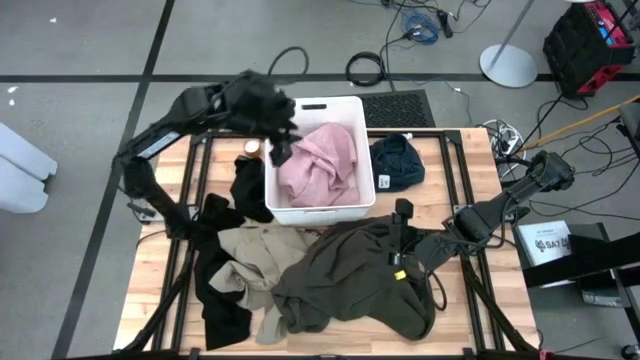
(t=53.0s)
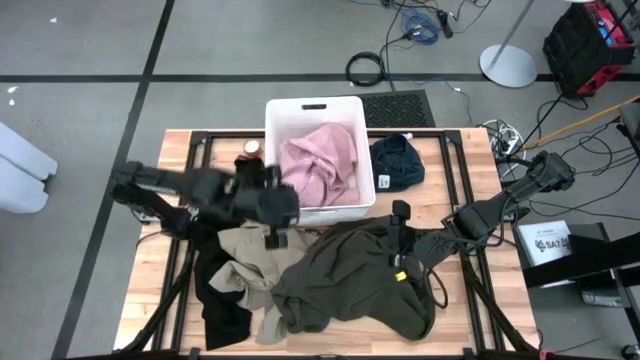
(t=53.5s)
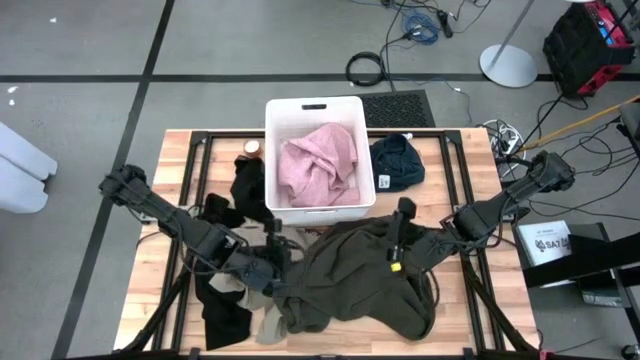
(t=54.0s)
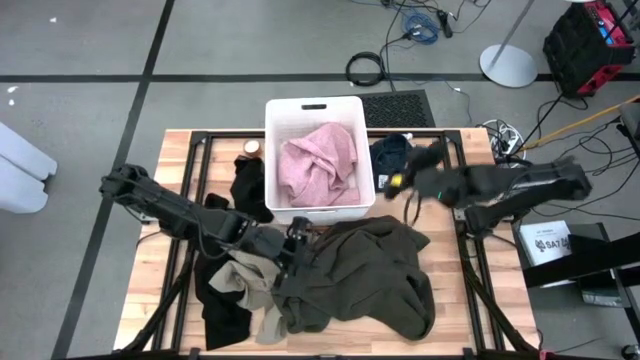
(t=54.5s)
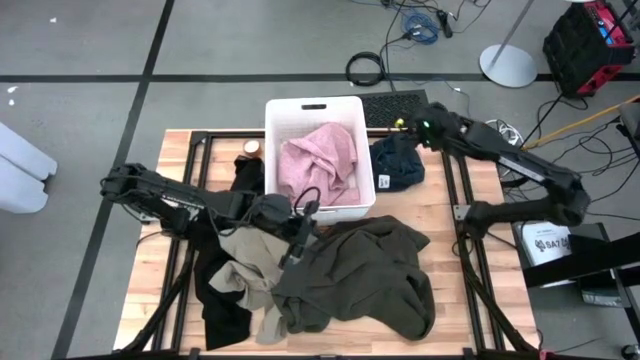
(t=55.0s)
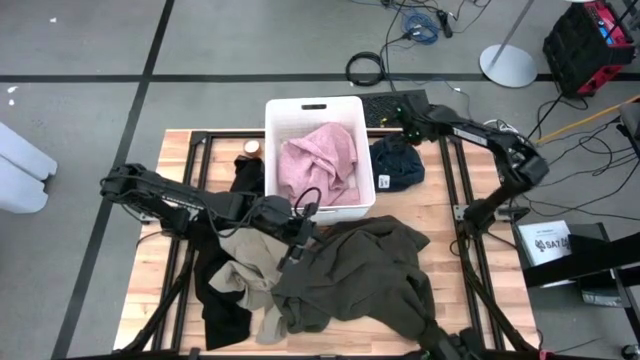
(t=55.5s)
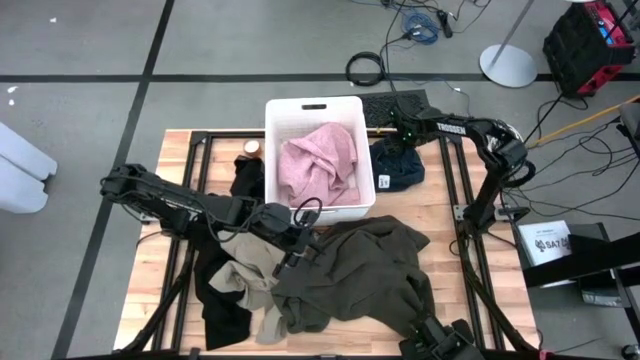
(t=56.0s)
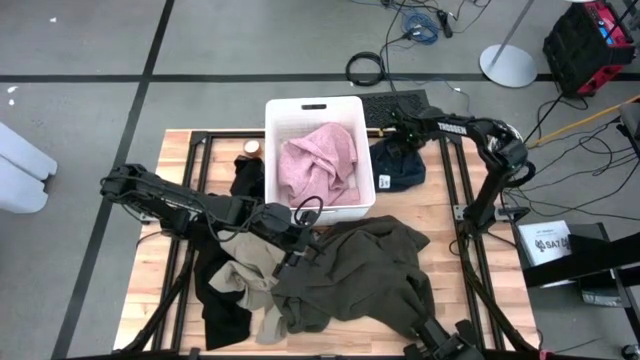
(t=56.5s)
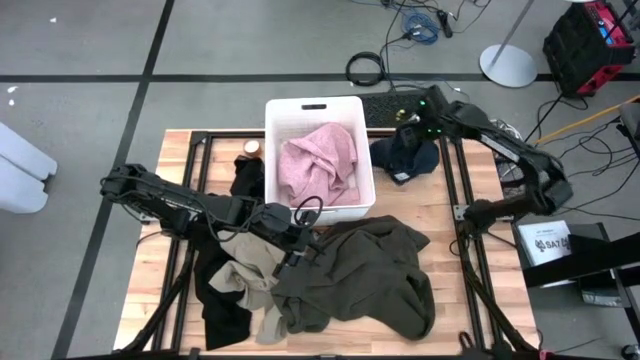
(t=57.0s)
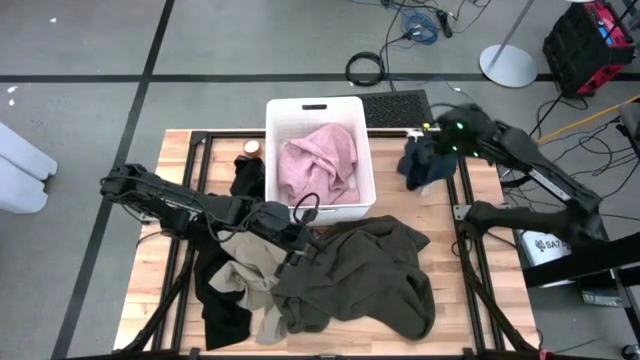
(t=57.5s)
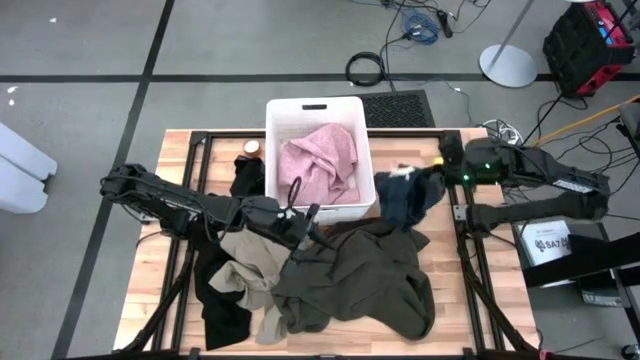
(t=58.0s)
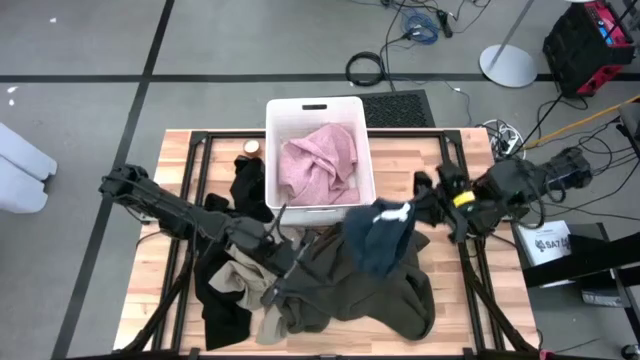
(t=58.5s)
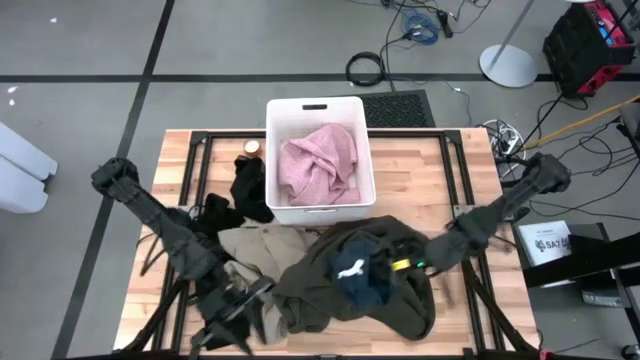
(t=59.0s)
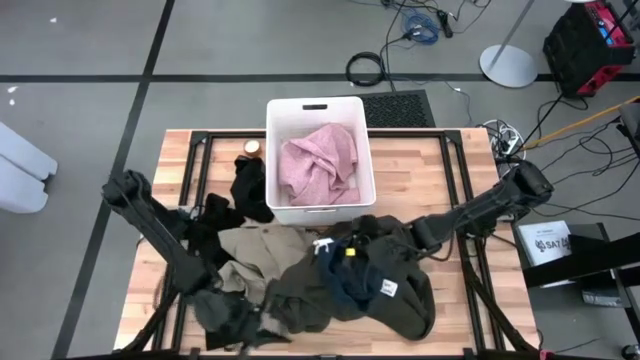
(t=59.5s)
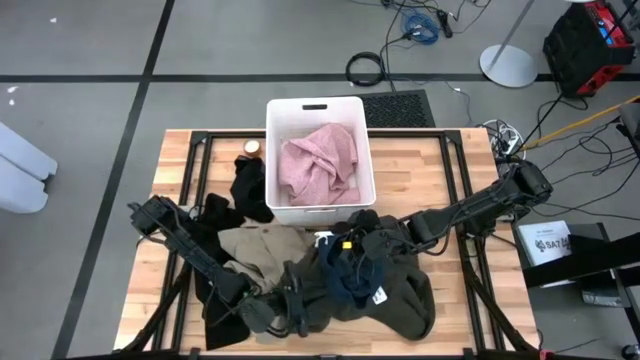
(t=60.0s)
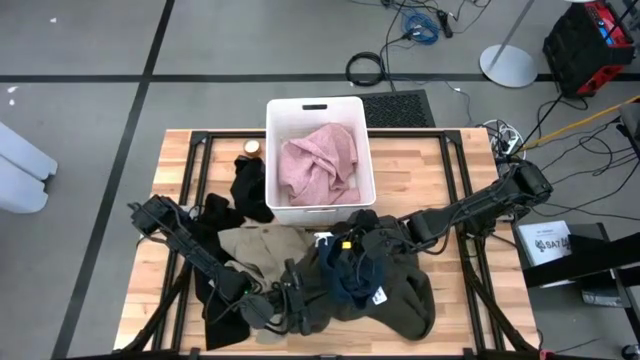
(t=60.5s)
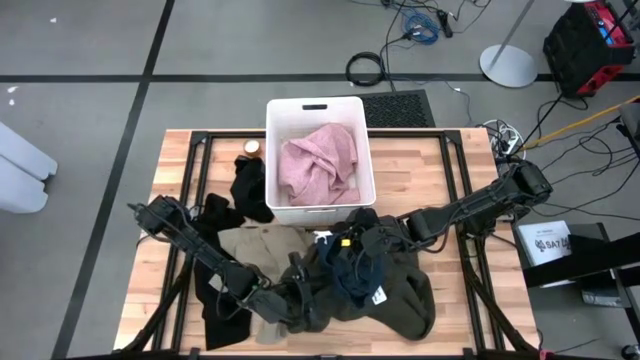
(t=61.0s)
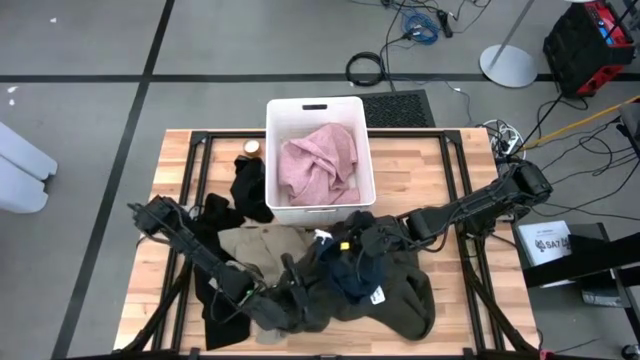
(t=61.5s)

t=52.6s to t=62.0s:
Task: Fold laundry
Fold the dark blue short pants

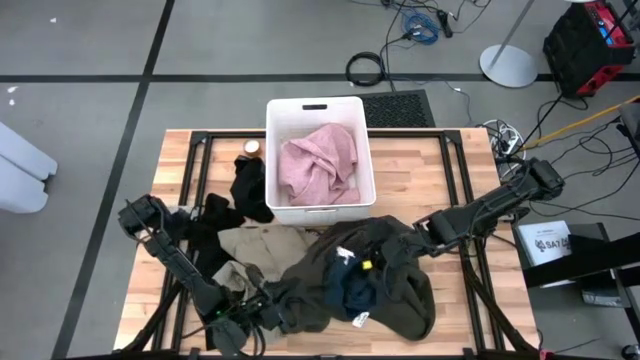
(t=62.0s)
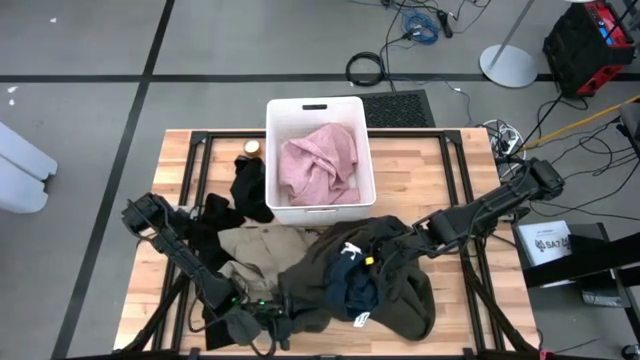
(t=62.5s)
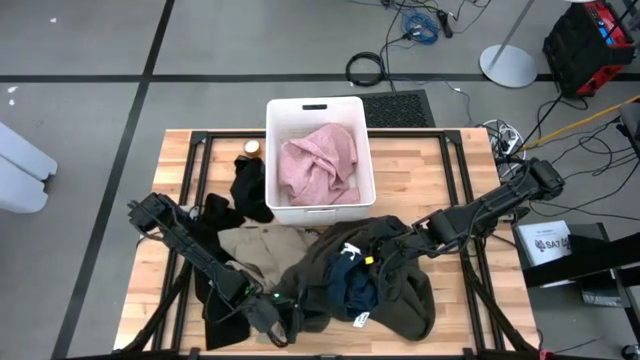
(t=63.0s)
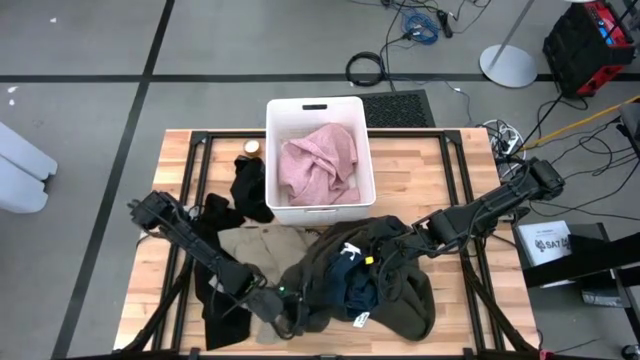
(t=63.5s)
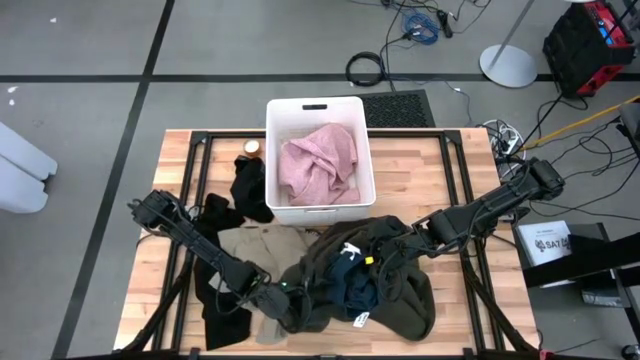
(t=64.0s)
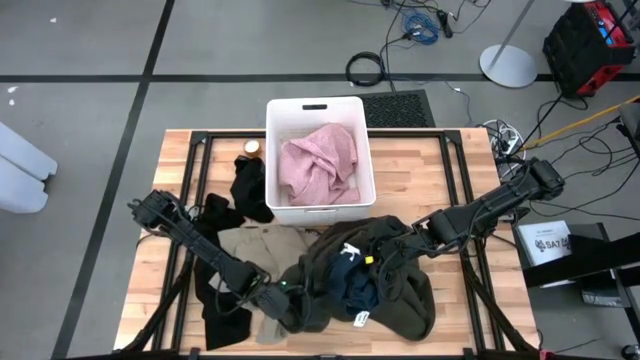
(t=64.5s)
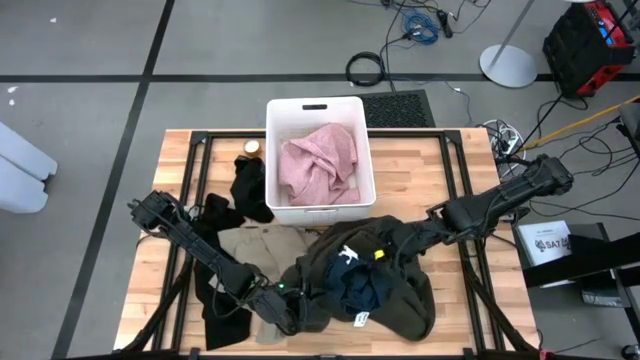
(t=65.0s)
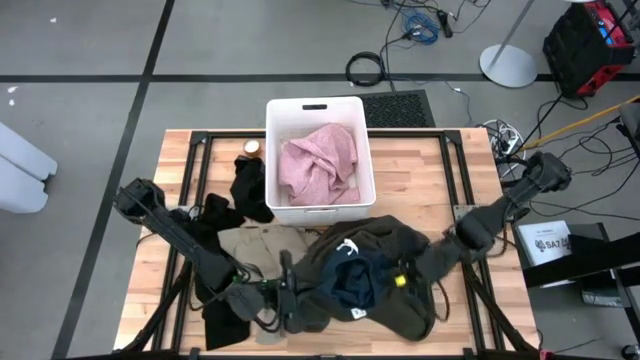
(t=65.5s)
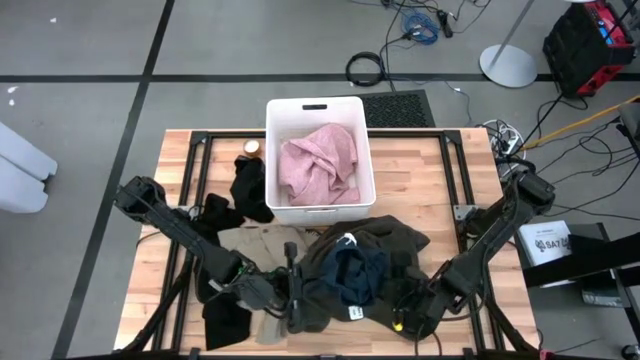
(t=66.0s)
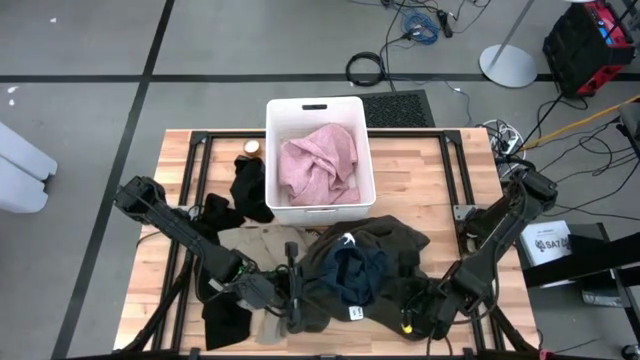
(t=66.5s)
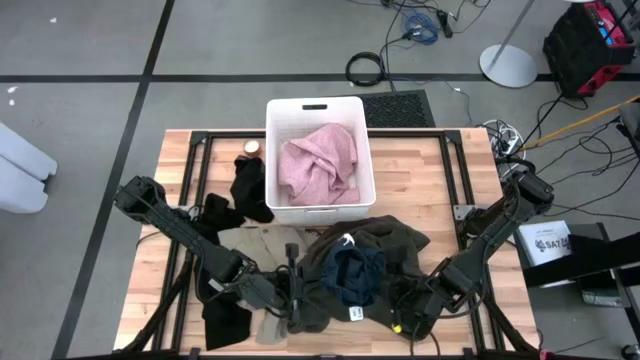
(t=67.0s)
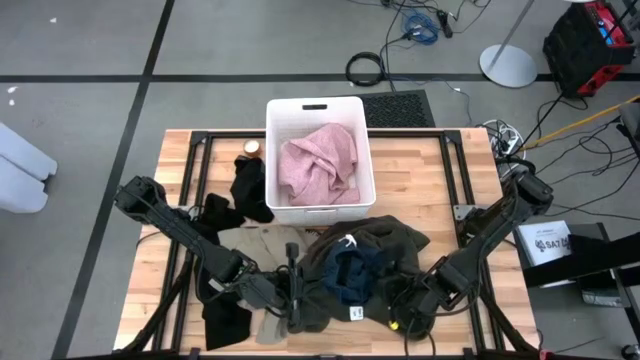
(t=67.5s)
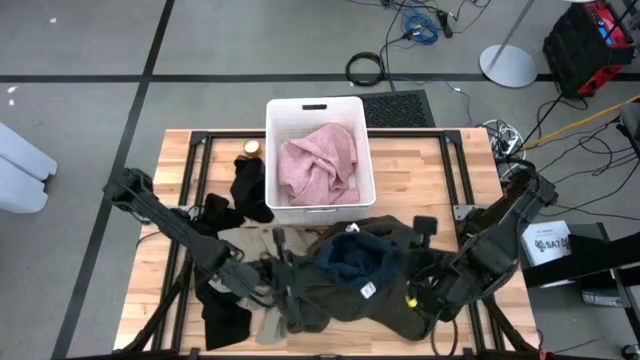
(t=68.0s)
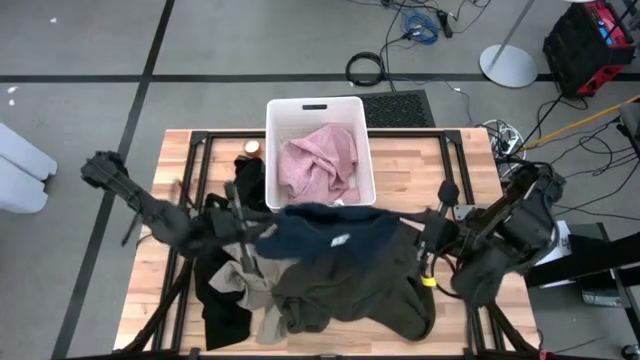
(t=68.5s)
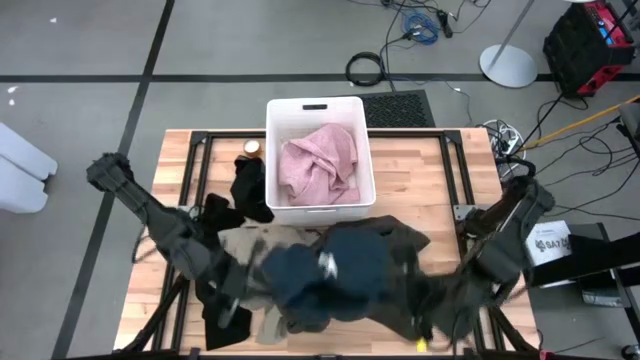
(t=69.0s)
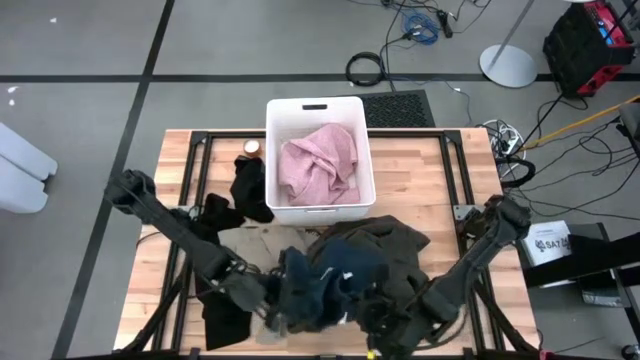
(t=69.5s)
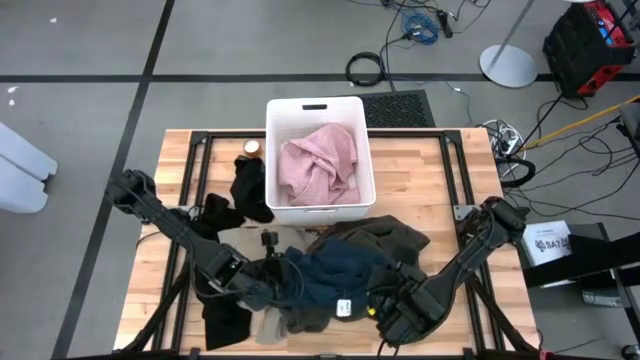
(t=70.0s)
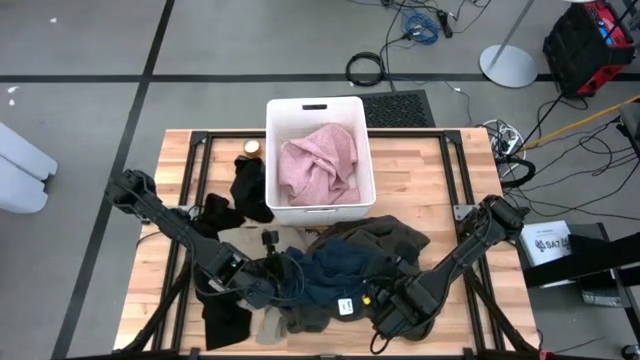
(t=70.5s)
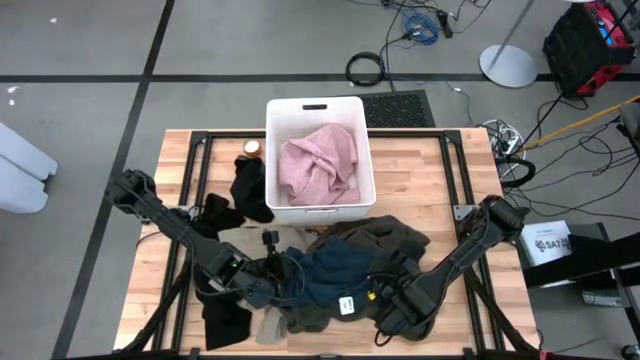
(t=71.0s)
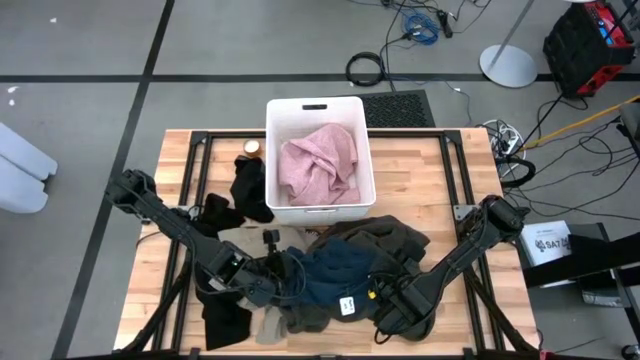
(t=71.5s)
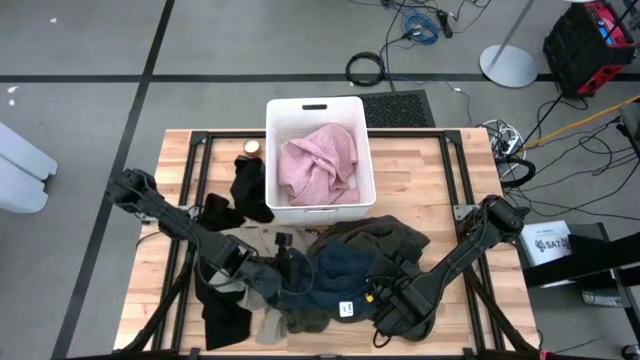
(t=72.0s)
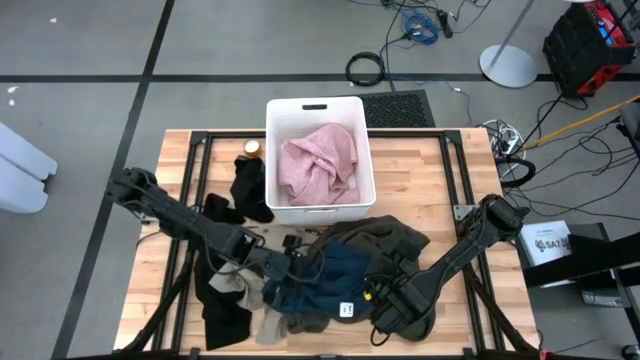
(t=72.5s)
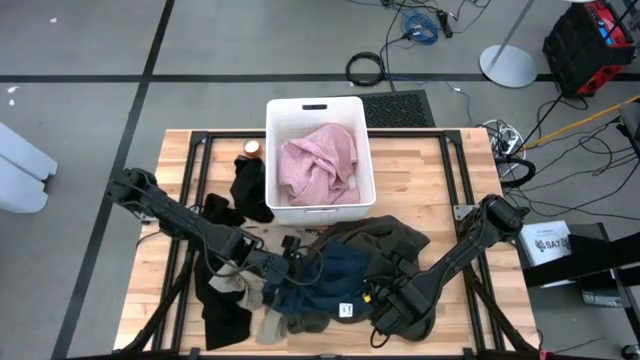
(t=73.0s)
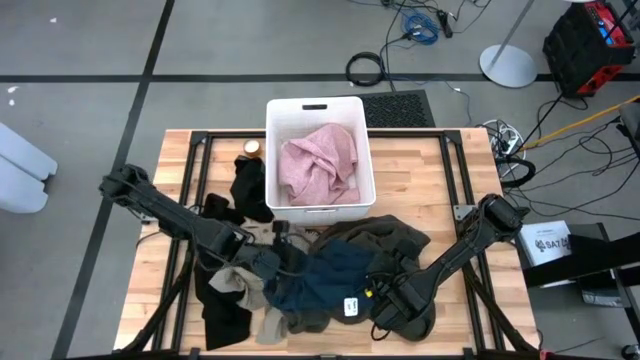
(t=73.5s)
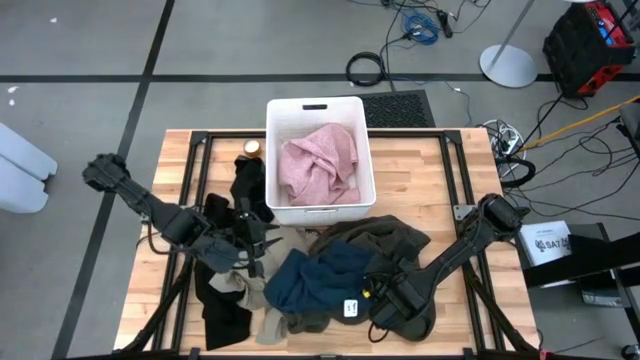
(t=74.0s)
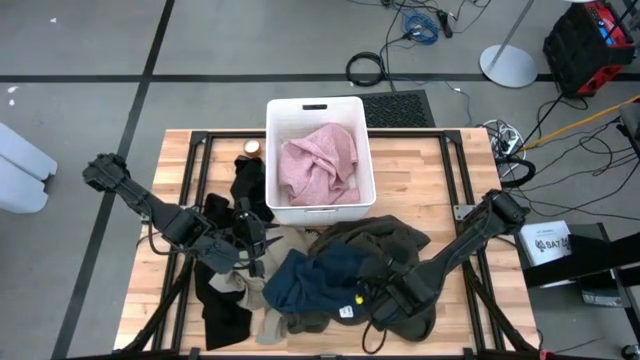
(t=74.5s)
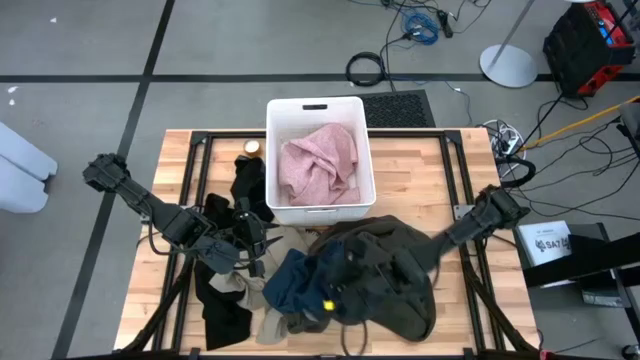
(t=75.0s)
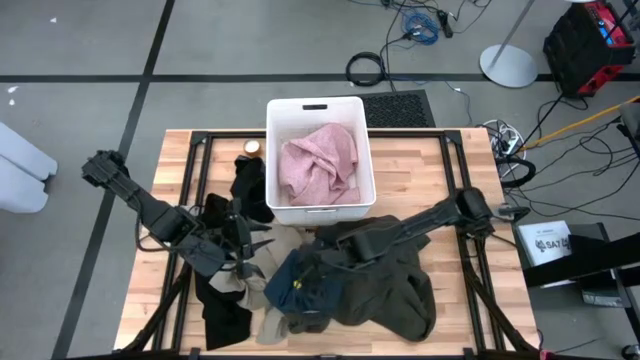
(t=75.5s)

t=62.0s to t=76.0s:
Fold the dark blue short pants
